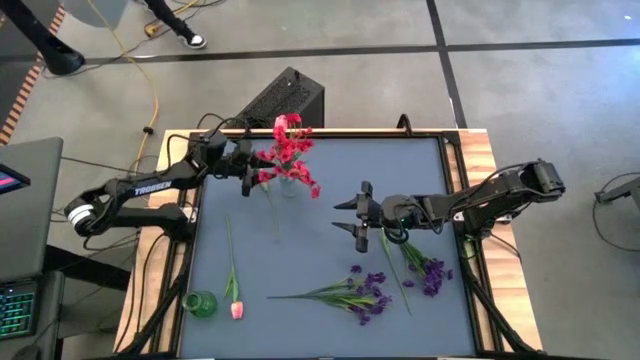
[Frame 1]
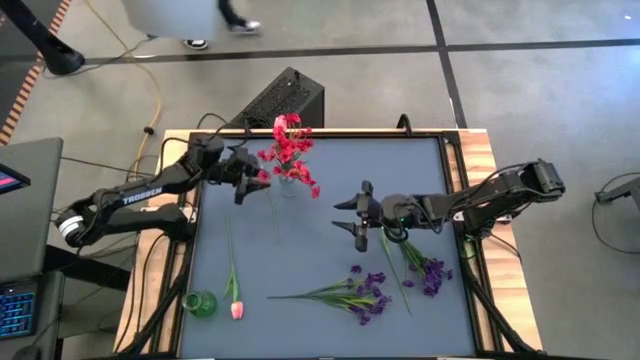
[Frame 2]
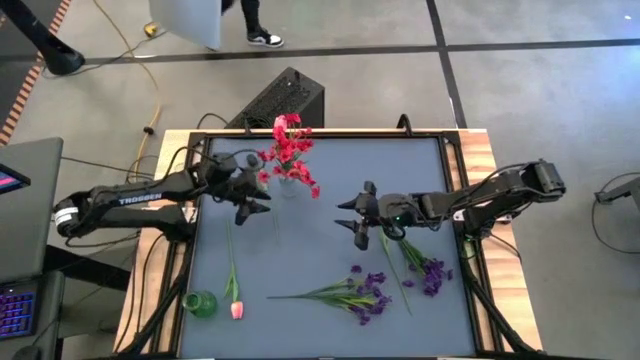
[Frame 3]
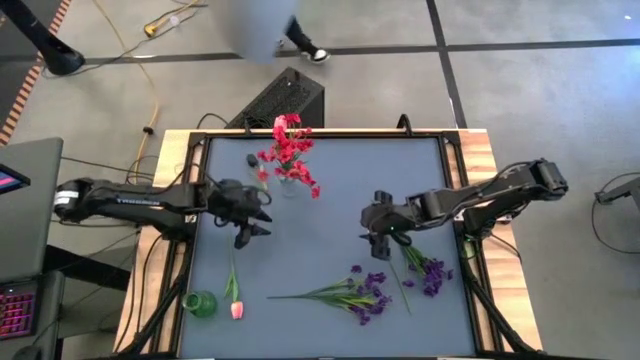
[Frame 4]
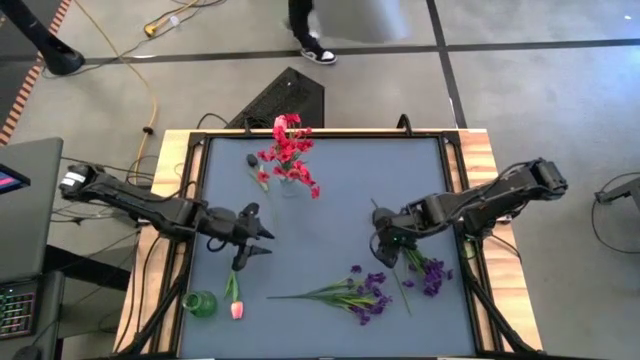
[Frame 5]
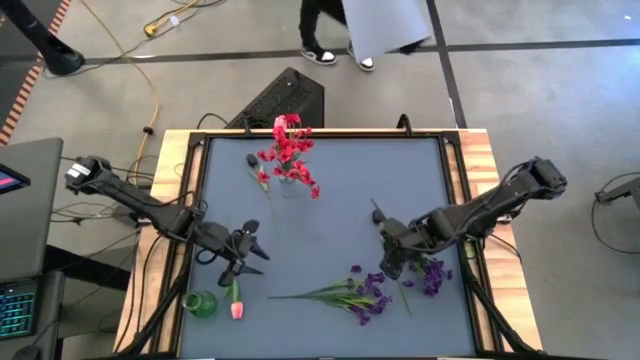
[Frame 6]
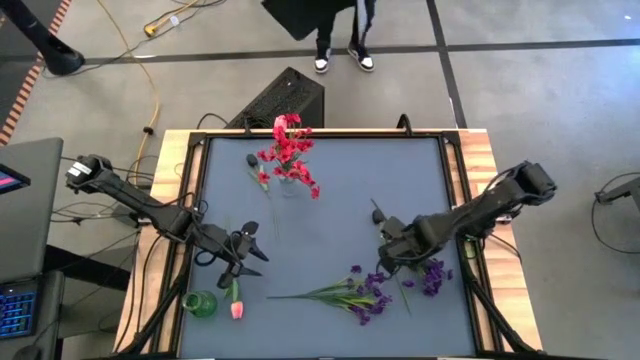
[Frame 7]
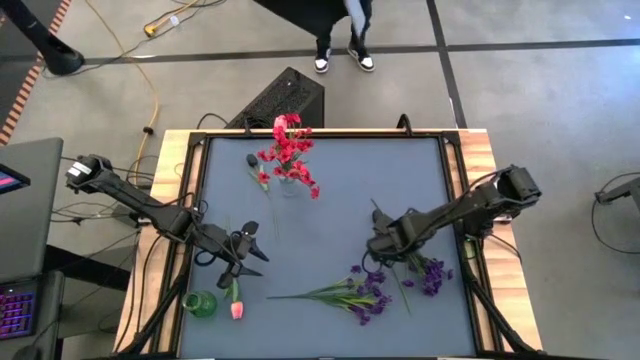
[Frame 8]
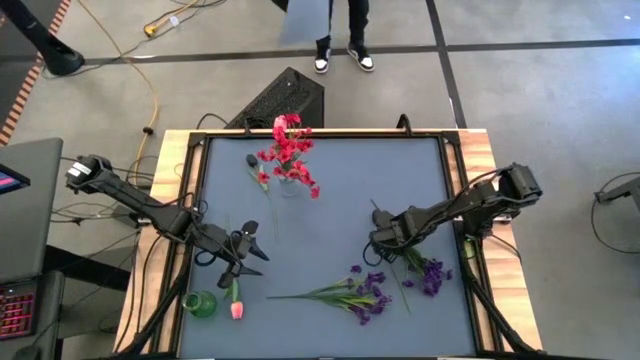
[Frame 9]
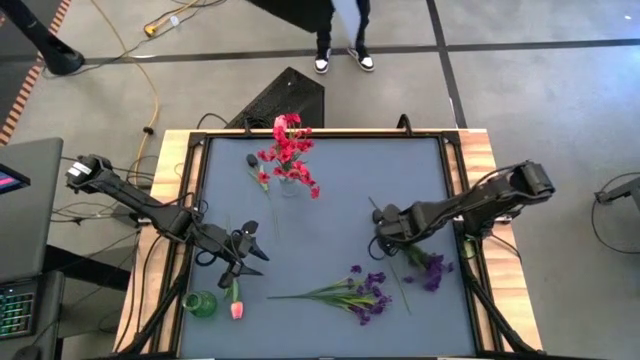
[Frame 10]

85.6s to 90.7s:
Task: Sort flowers into vase by color
Put the top violet flower into the green vase

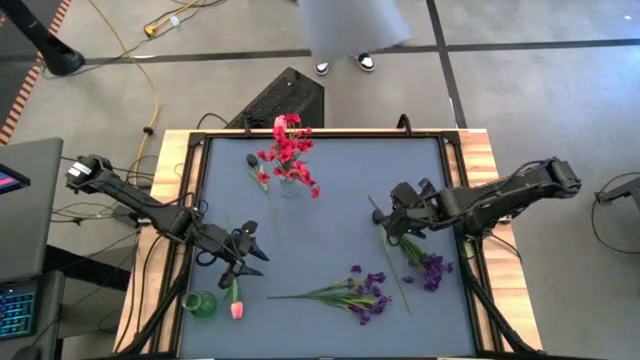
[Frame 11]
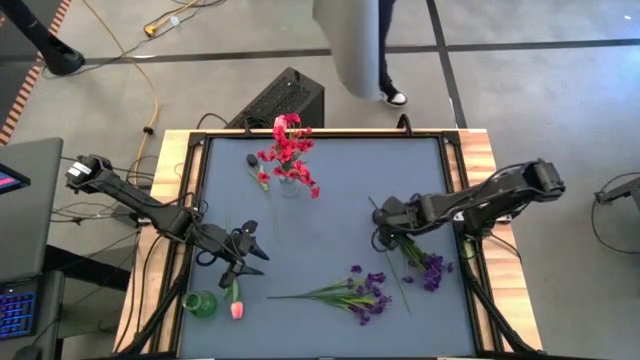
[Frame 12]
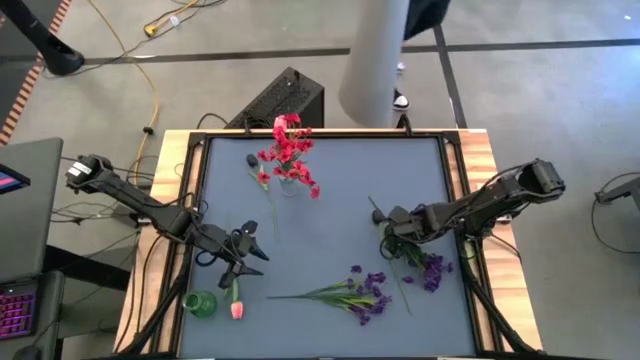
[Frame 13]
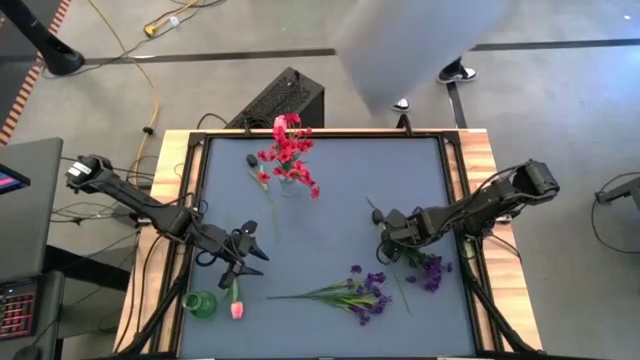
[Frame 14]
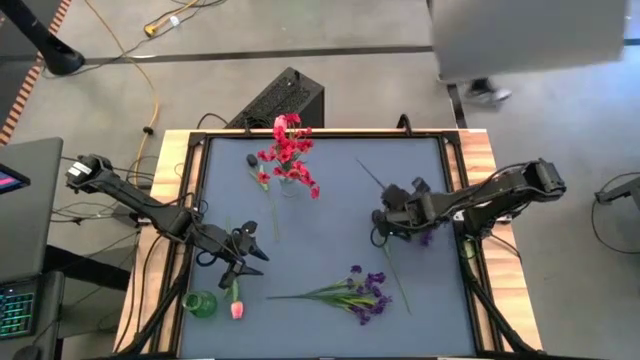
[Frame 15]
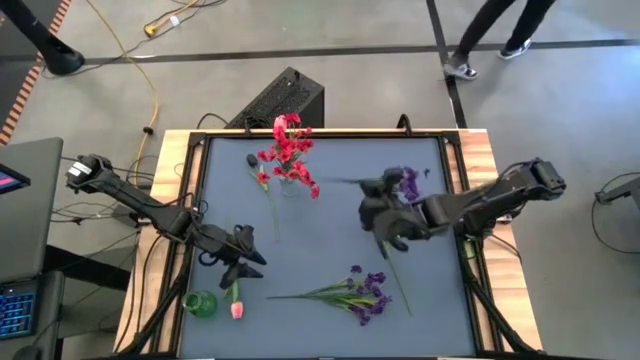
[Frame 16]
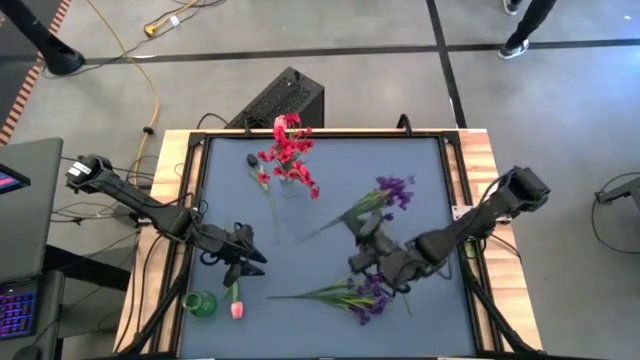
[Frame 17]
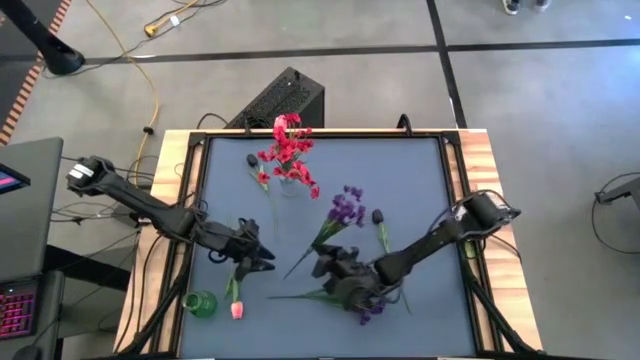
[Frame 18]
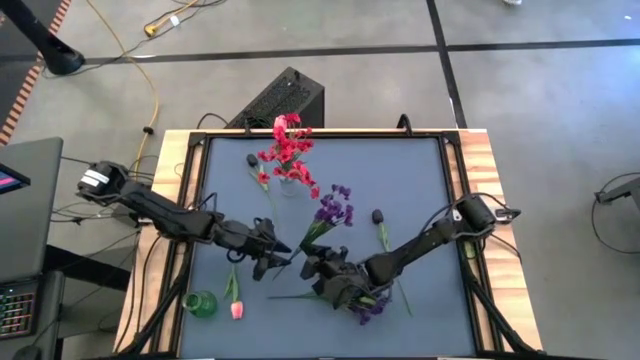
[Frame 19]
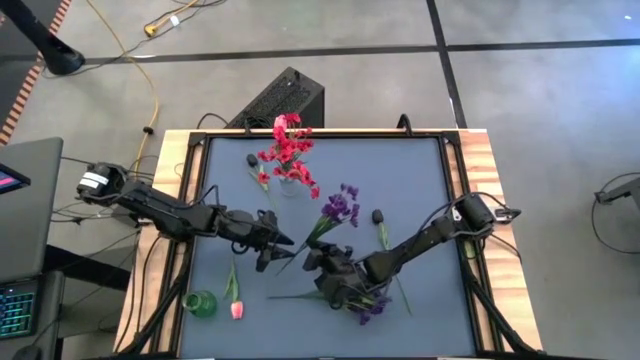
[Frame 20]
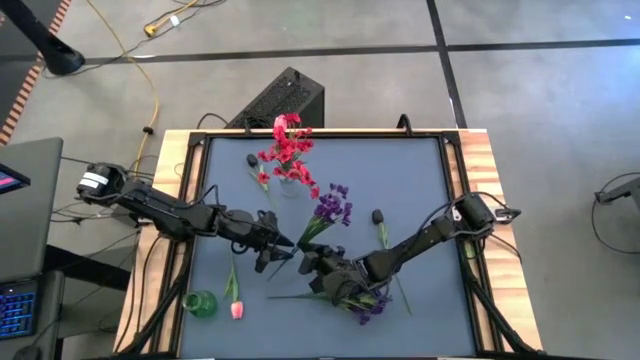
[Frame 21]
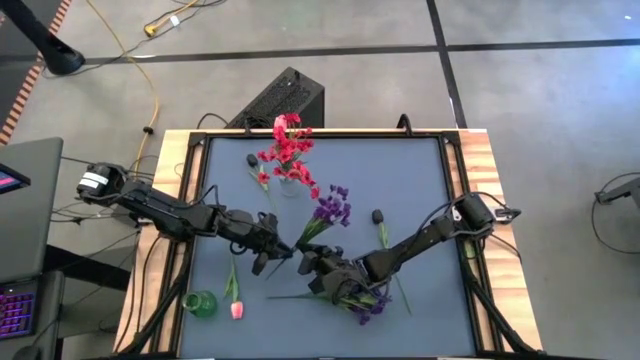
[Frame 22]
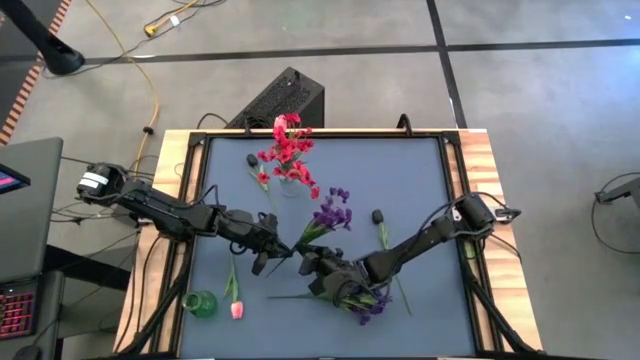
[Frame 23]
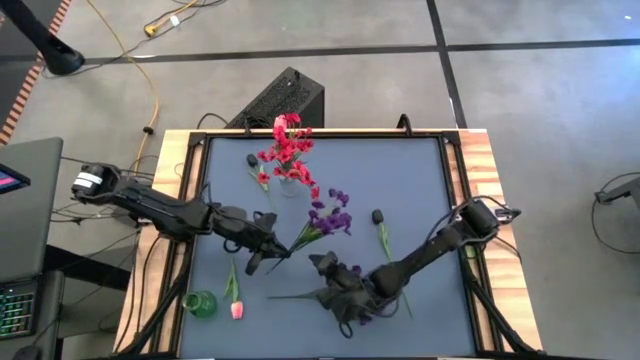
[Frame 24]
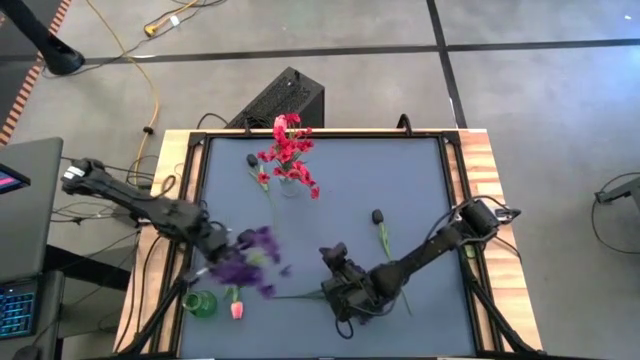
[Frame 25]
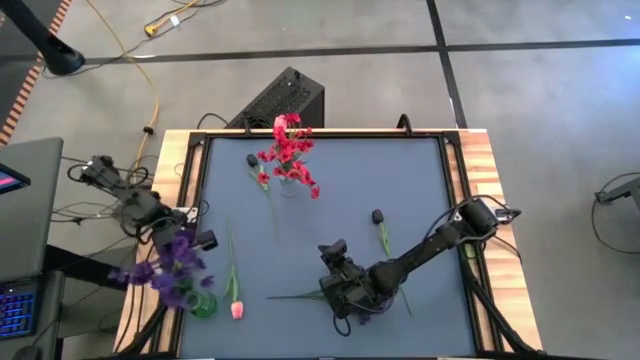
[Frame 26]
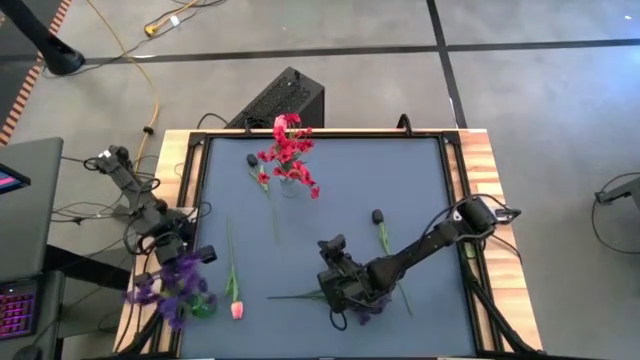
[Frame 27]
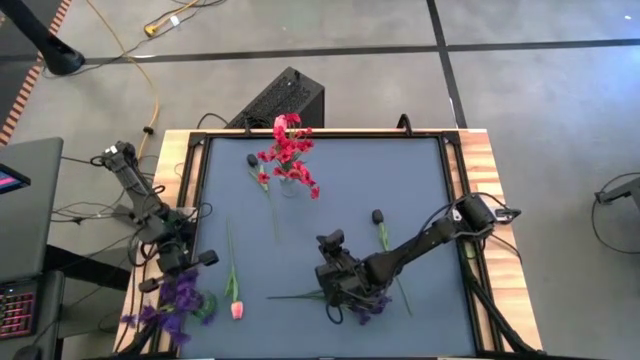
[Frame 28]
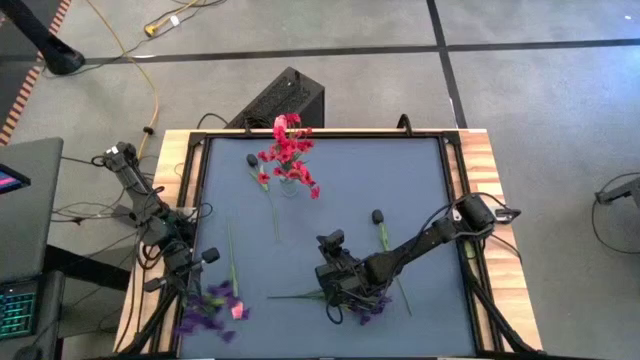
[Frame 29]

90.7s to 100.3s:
Put the top violet flower into the green vase

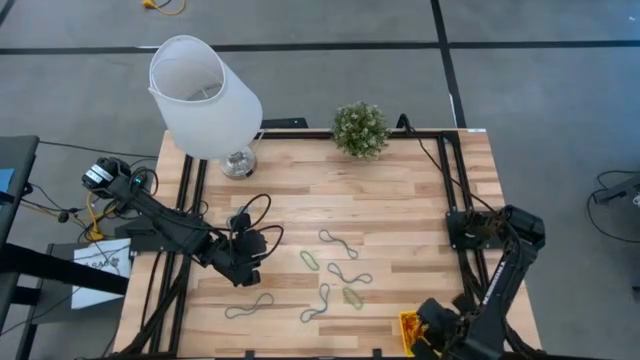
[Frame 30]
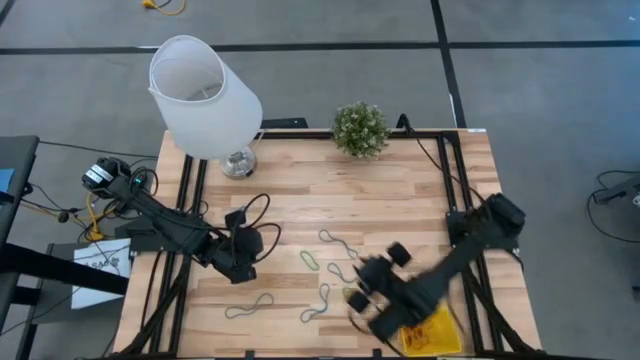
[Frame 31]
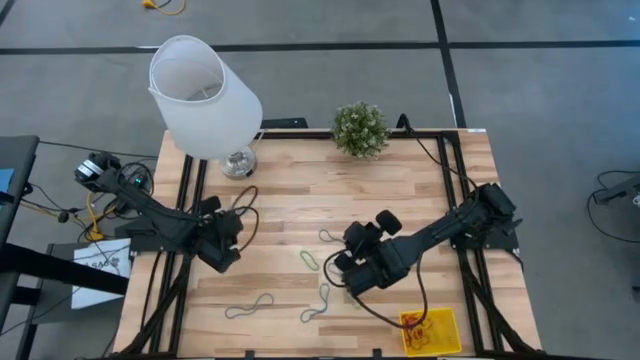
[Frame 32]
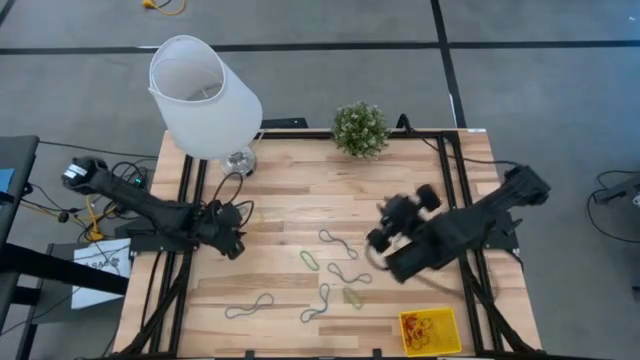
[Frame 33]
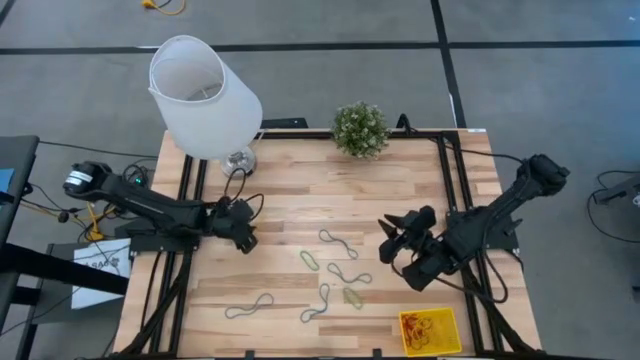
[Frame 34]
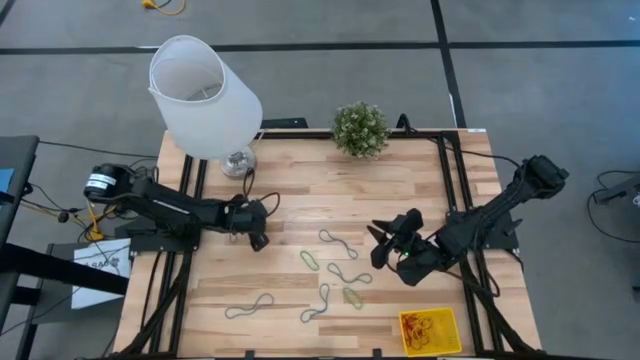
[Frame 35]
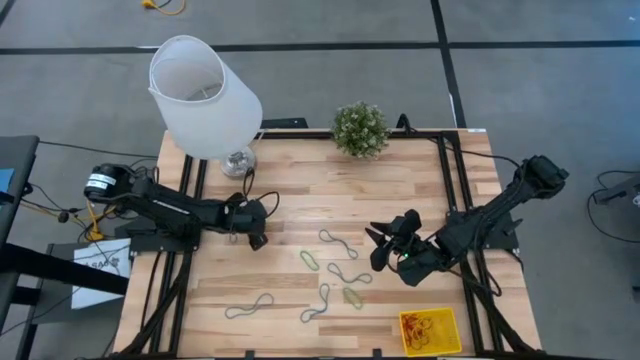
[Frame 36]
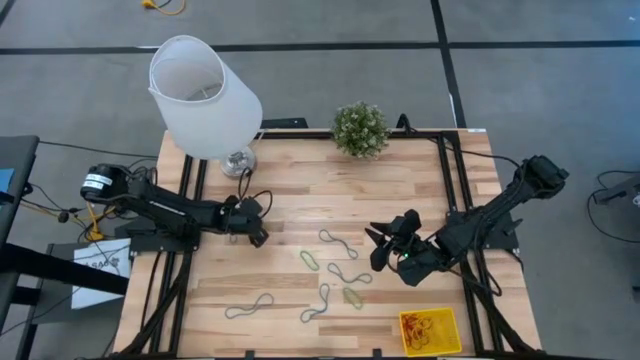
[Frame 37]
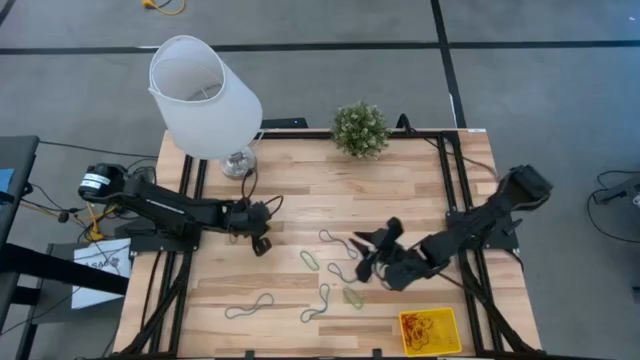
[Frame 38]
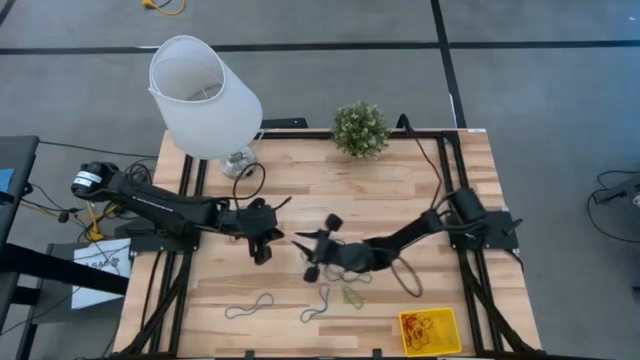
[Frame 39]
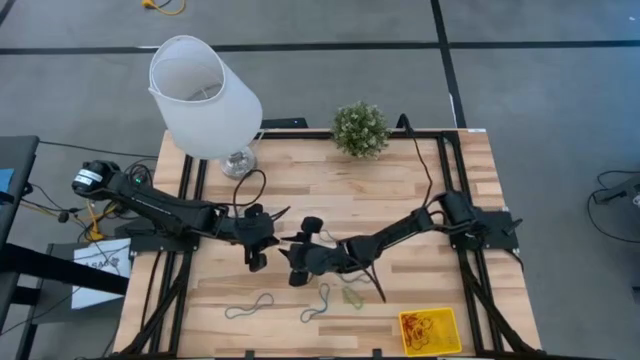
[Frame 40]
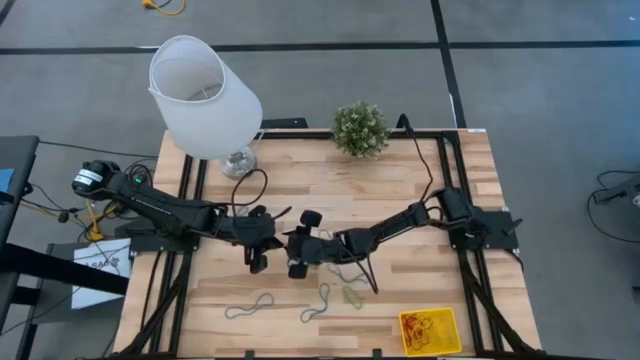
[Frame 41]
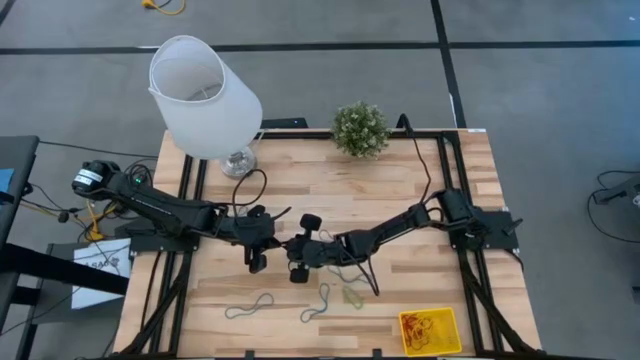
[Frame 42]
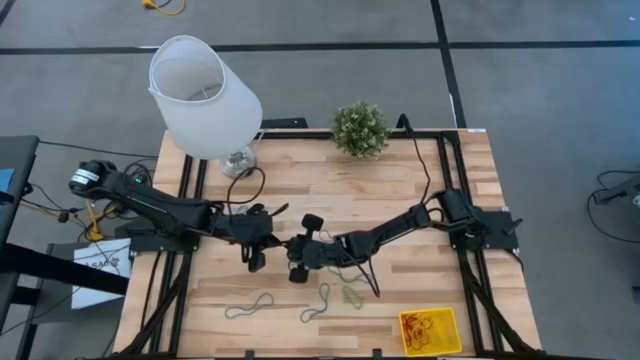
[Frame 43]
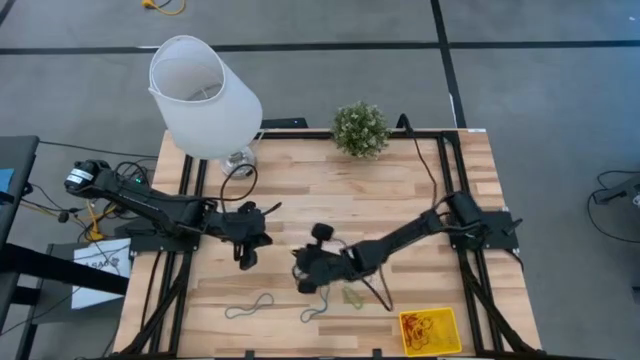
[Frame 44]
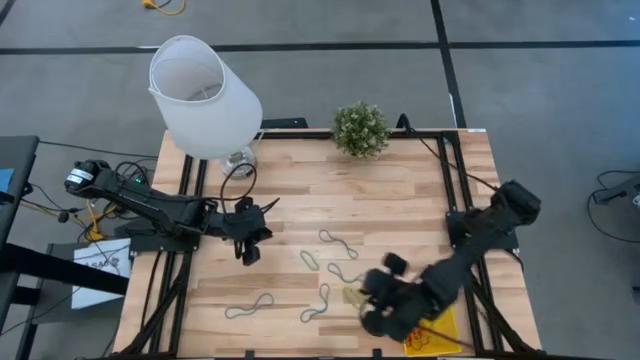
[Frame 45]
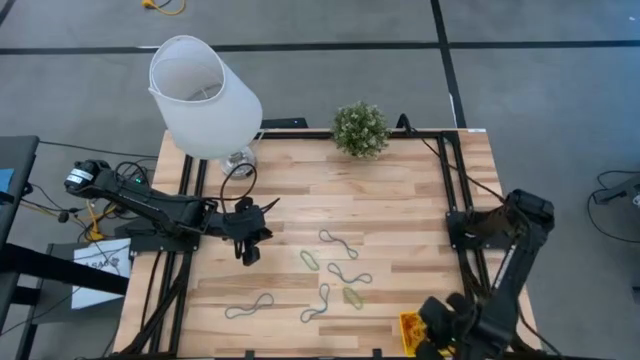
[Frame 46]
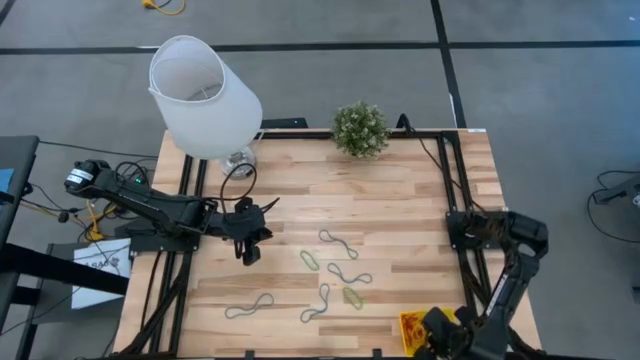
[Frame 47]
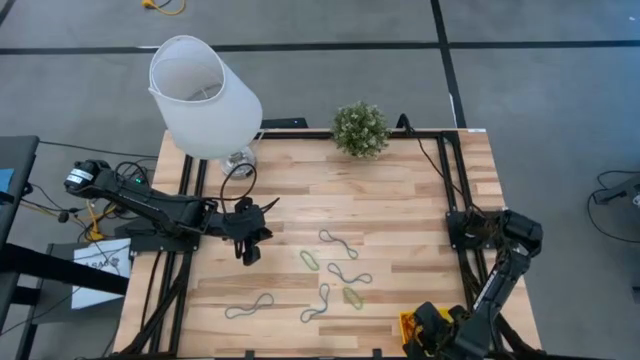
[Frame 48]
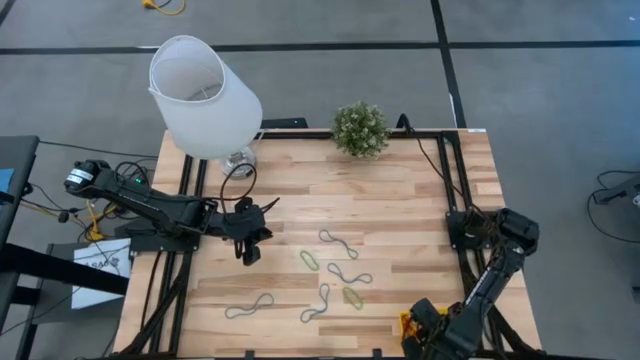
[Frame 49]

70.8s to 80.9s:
Task: Pick and place rubber bands into bin
Put the yellow rubber band into the yellow basket
